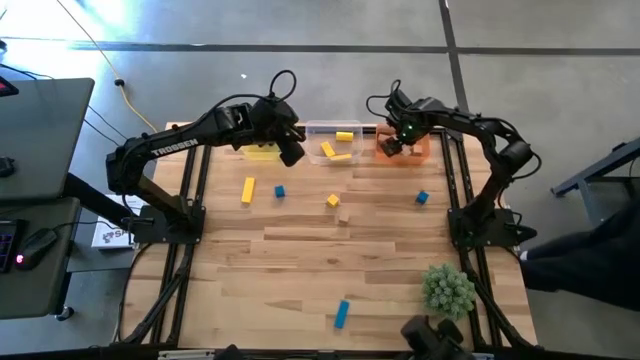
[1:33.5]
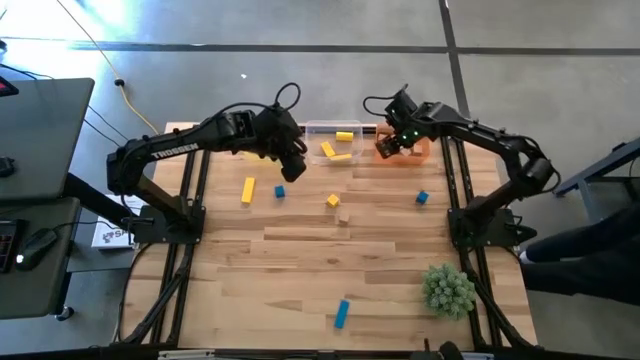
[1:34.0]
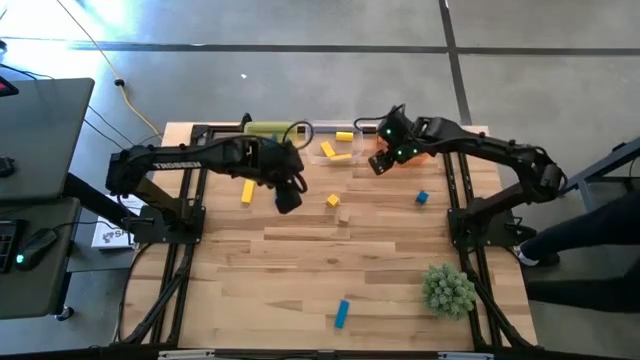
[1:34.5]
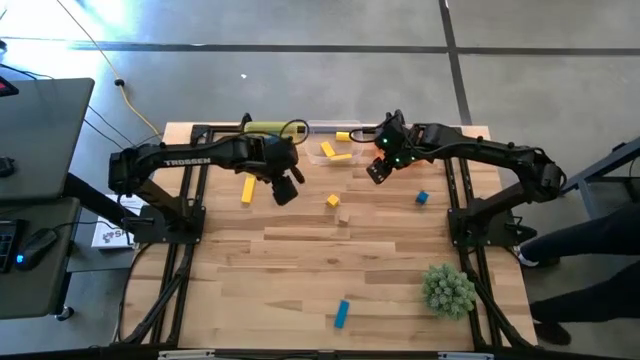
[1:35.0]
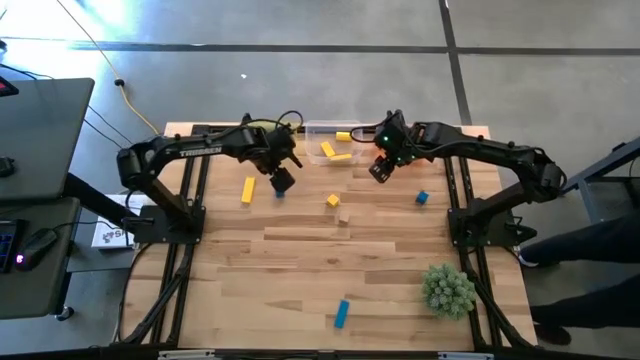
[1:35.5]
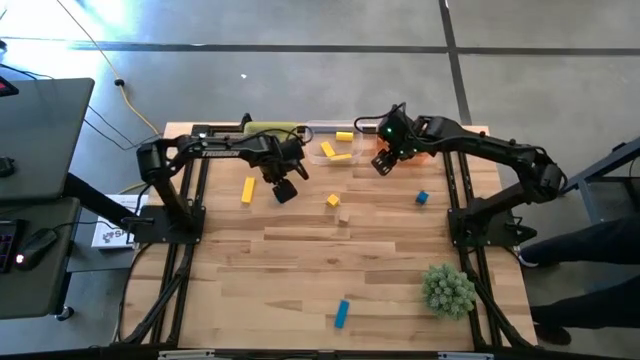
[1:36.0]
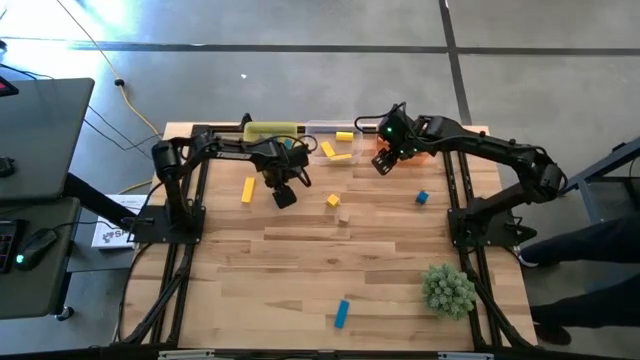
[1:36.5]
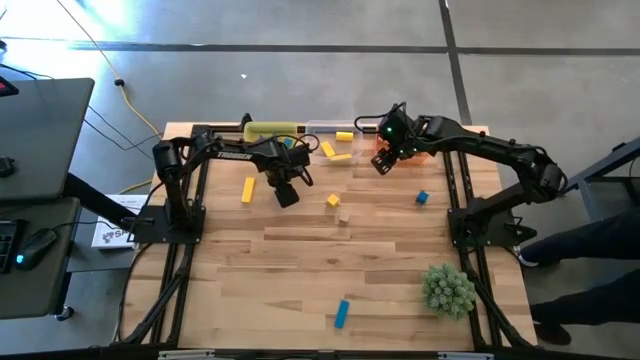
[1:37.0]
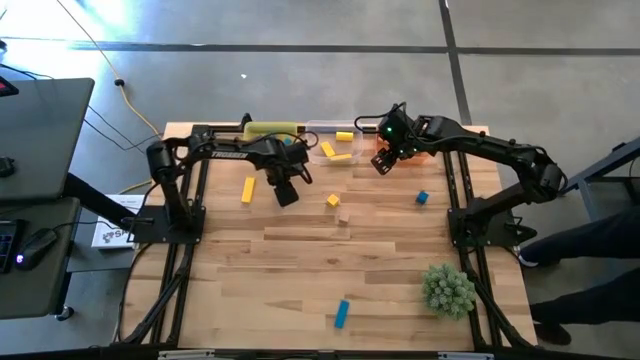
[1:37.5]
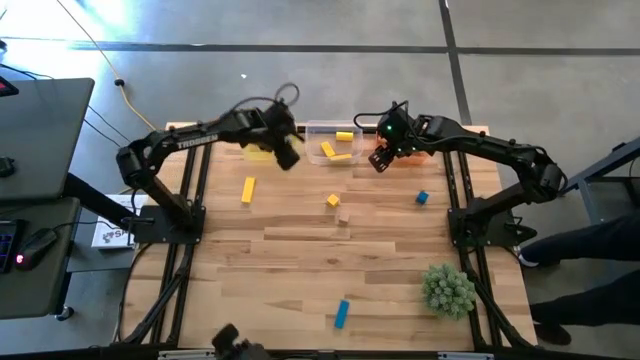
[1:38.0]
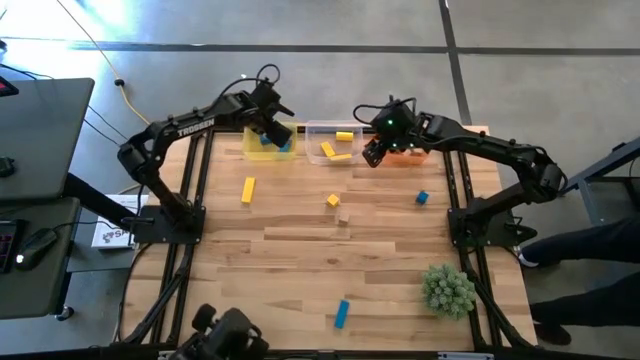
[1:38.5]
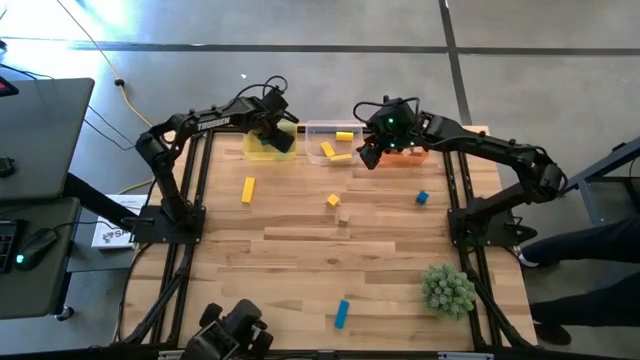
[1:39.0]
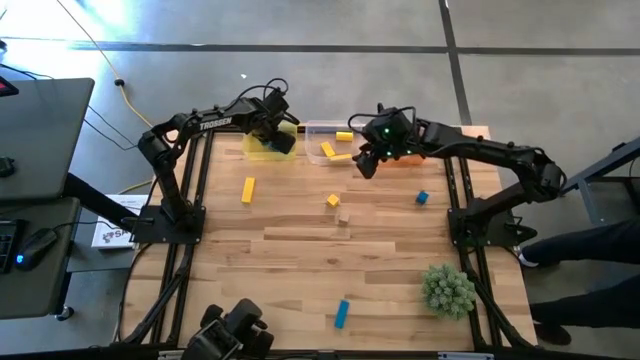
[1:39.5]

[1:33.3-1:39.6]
Task: Sort & place blocks by color
Put the blue block into the yellow bin

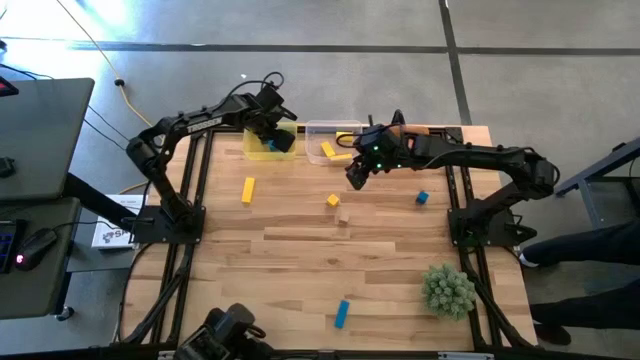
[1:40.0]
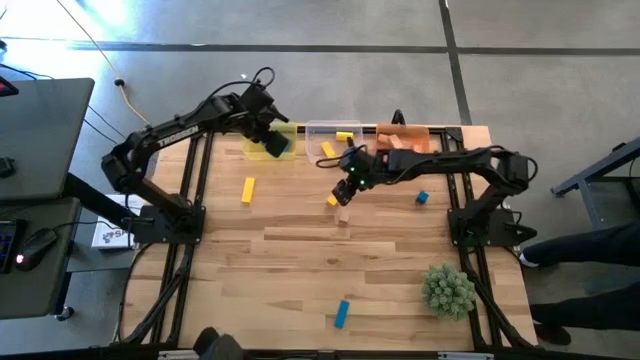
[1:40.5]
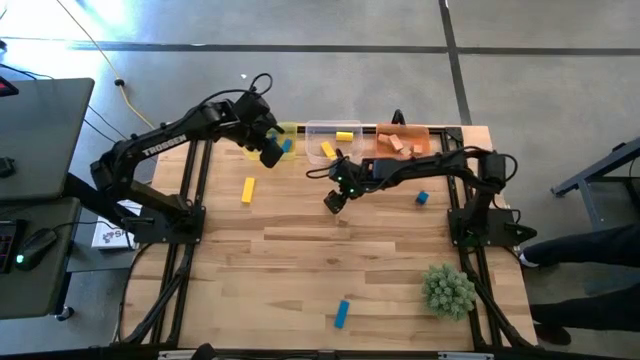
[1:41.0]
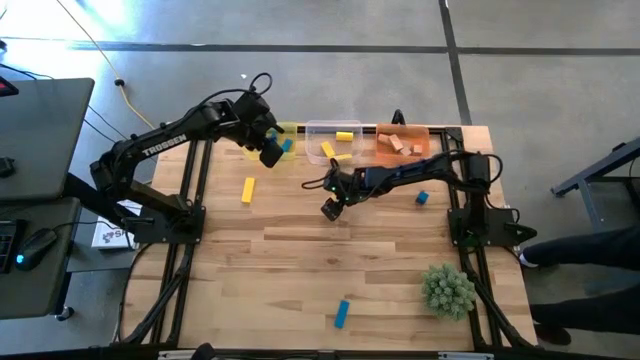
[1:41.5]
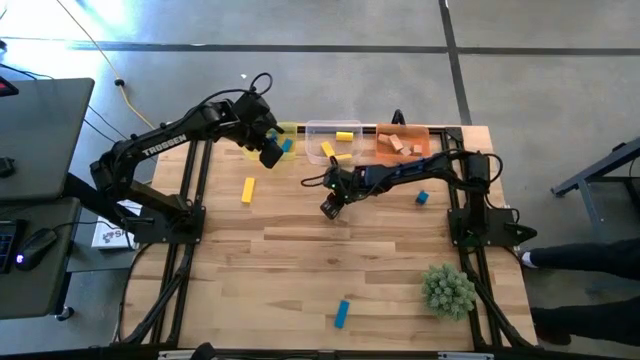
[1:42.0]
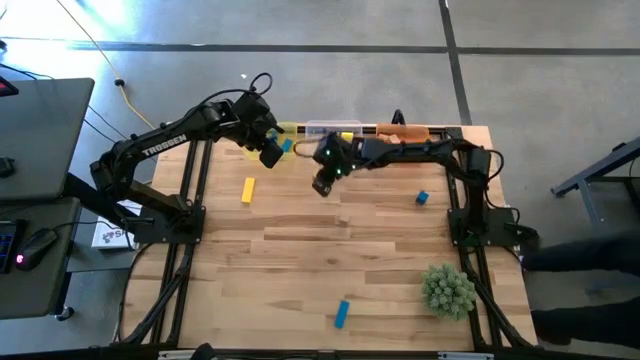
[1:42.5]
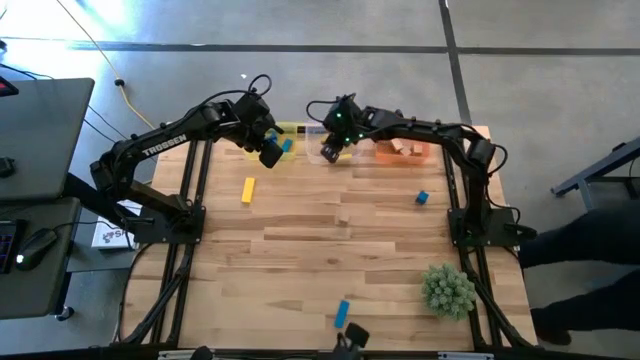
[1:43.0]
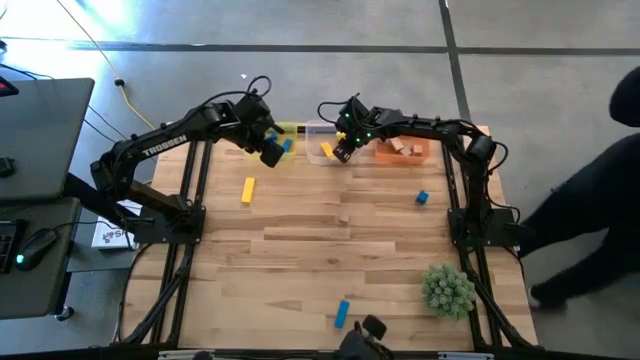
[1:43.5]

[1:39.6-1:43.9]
Put the yellow block into the transparent bin

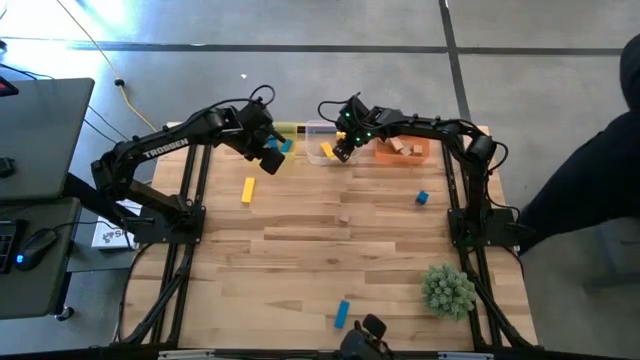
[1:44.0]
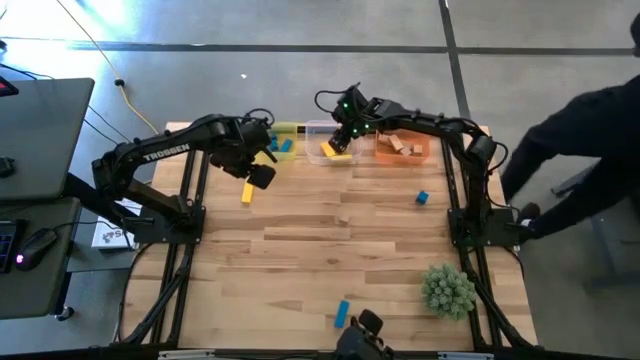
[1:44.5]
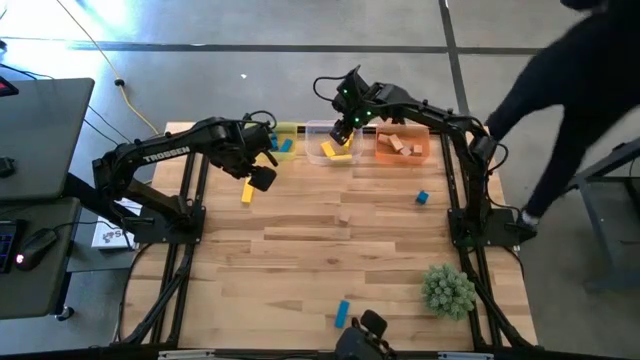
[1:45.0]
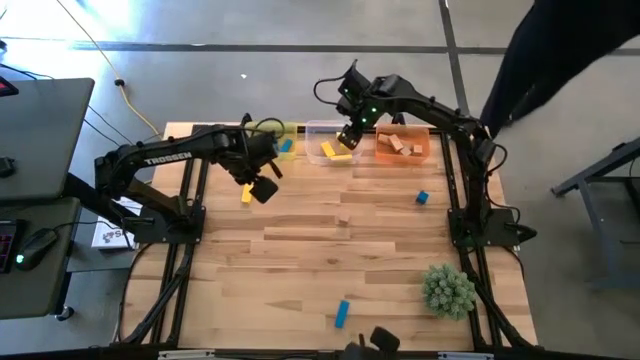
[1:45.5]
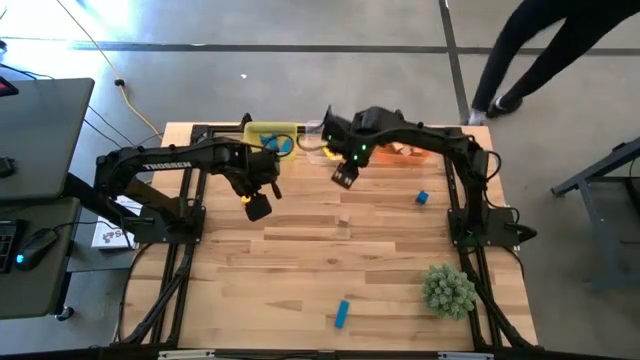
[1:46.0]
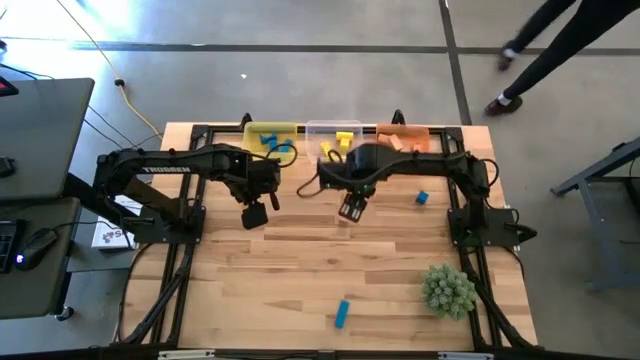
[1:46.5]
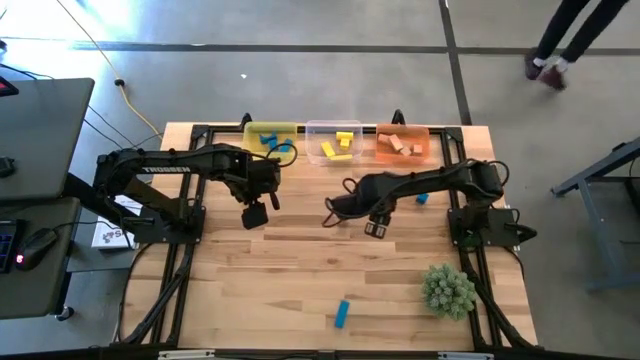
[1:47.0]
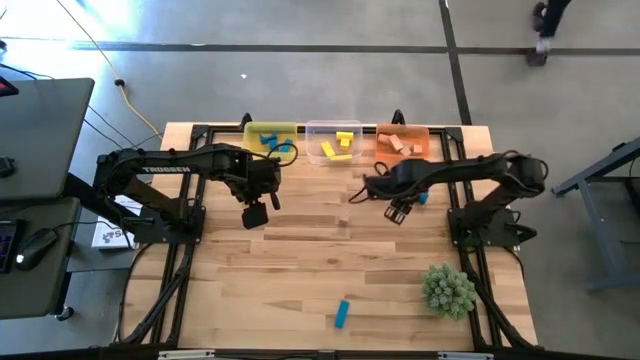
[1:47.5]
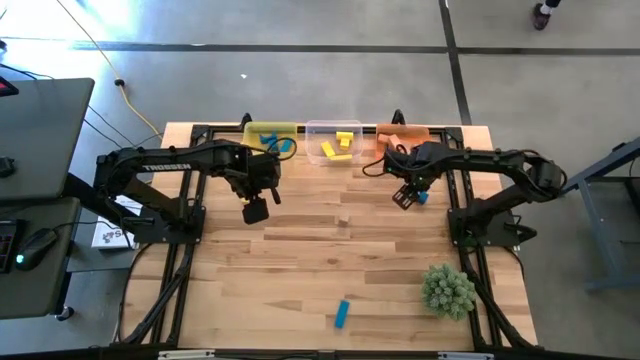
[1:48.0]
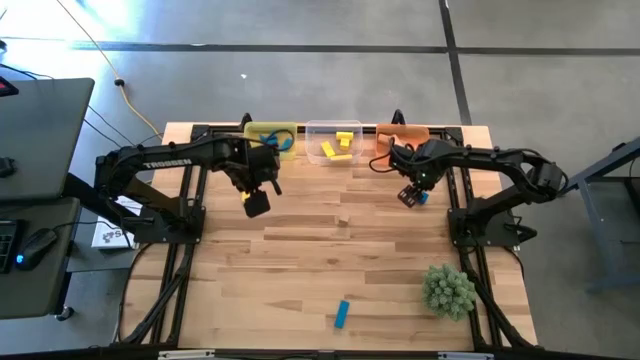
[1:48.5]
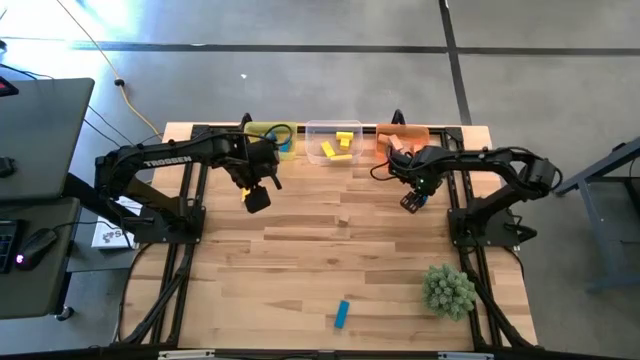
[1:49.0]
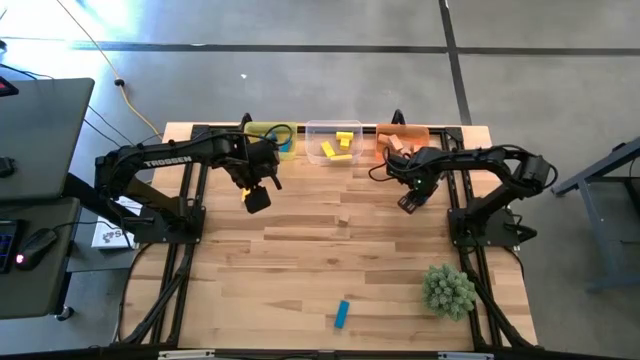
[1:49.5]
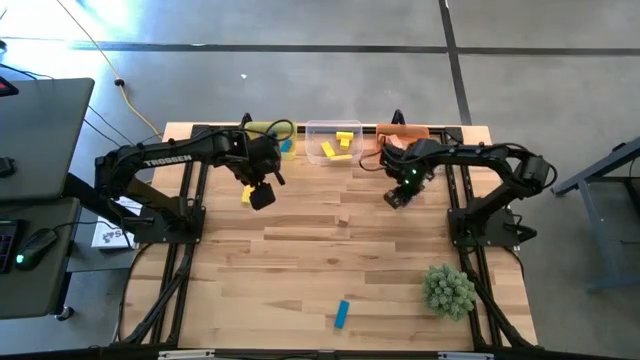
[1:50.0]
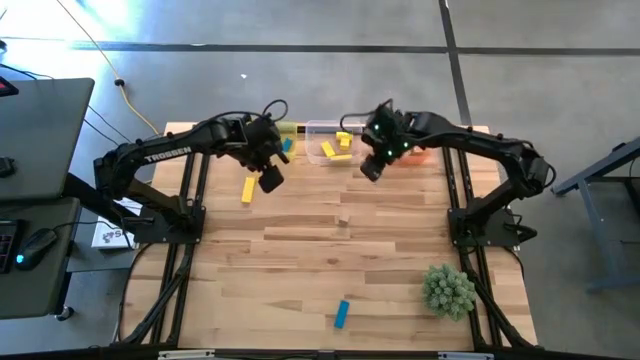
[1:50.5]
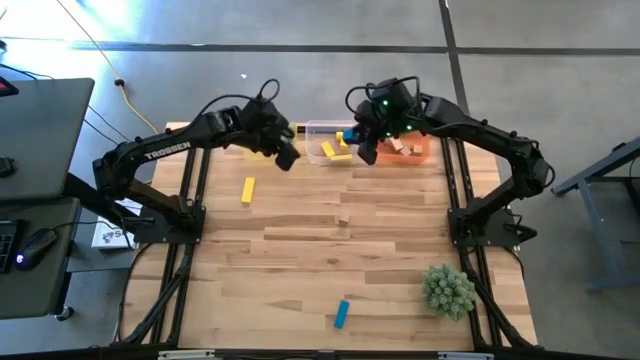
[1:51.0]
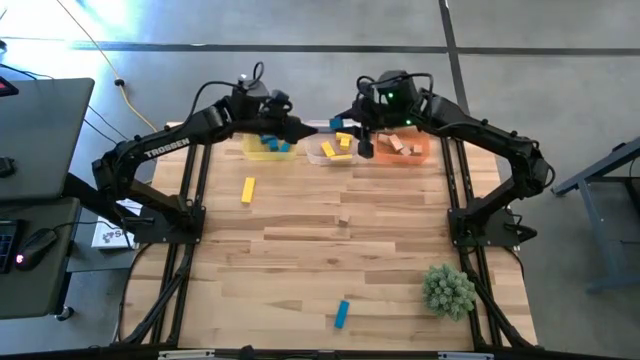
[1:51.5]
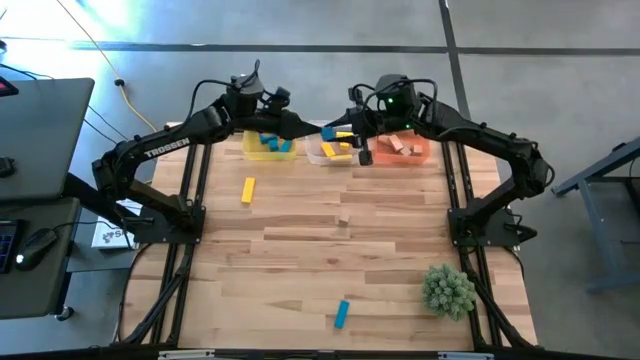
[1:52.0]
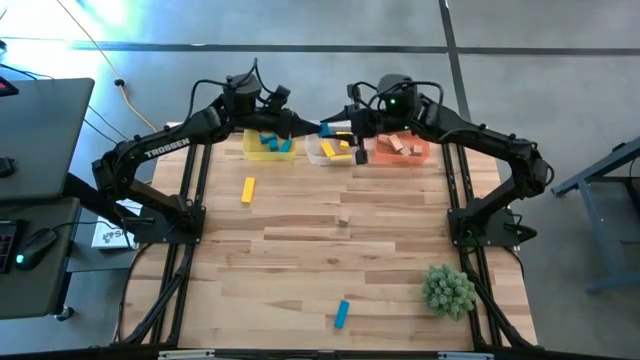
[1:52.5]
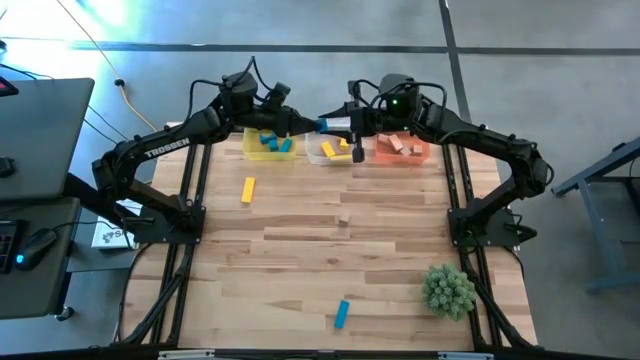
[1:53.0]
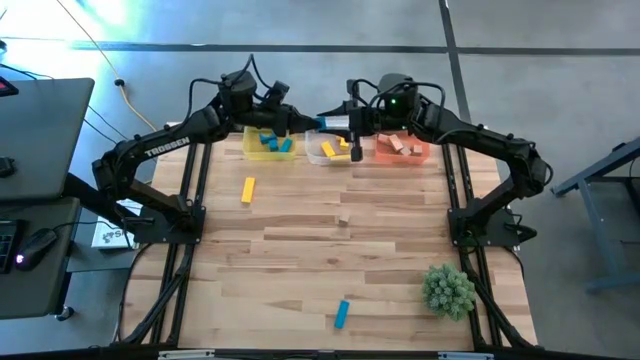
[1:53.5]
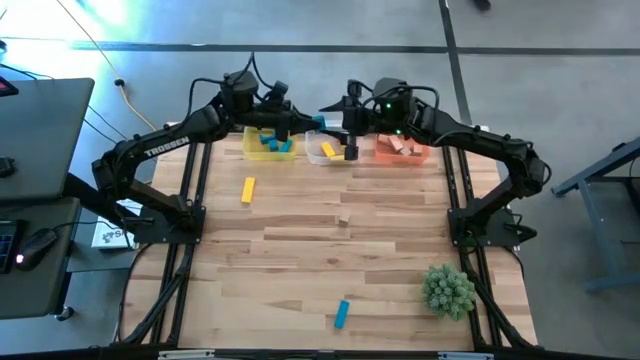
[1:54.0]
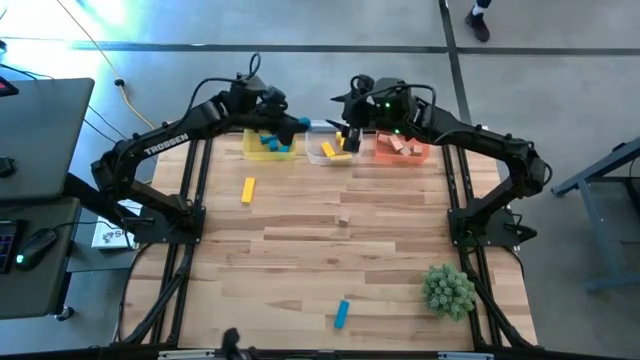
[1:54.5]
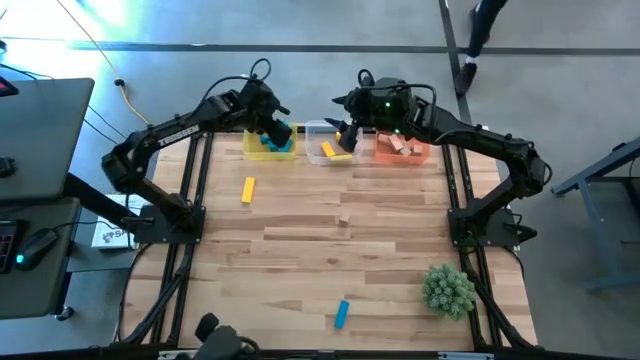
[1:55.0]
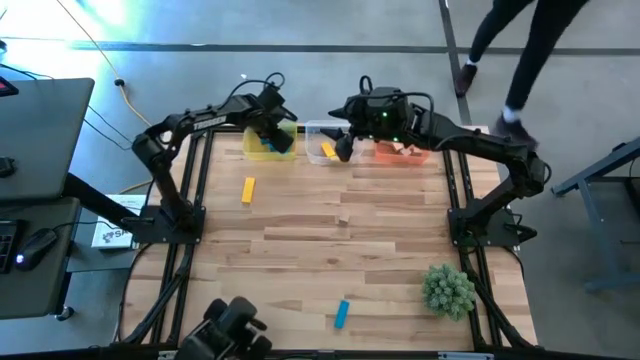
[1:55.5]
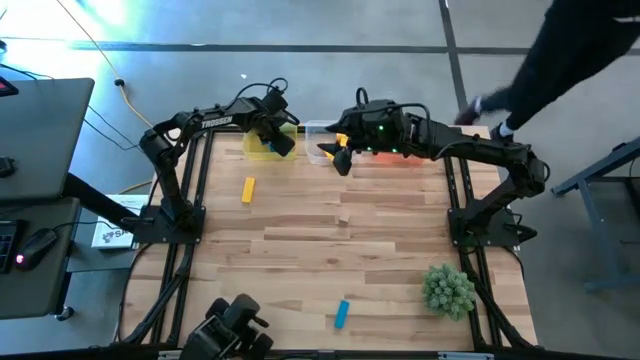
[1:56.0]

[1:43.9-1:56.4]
Put the blue block into the yellow bin
